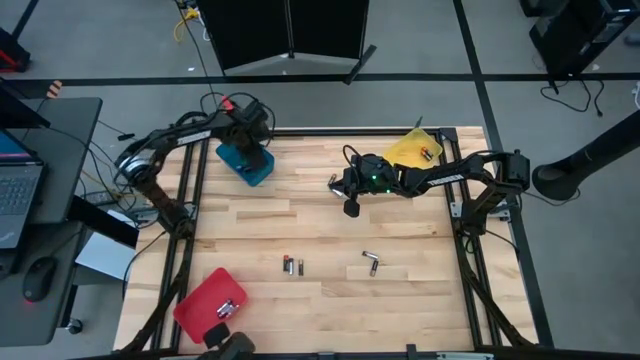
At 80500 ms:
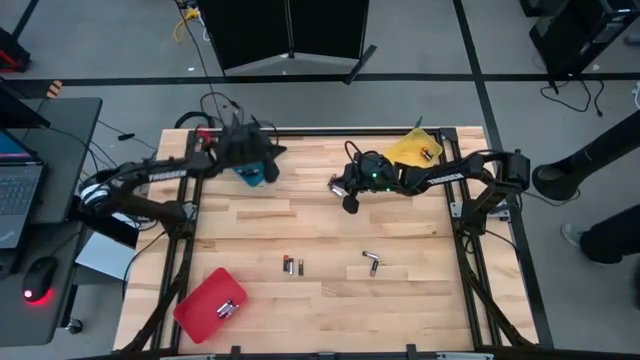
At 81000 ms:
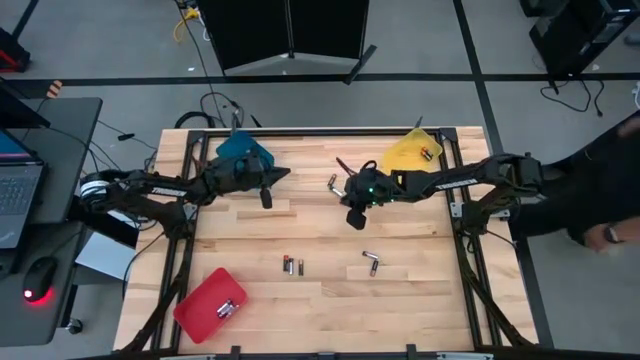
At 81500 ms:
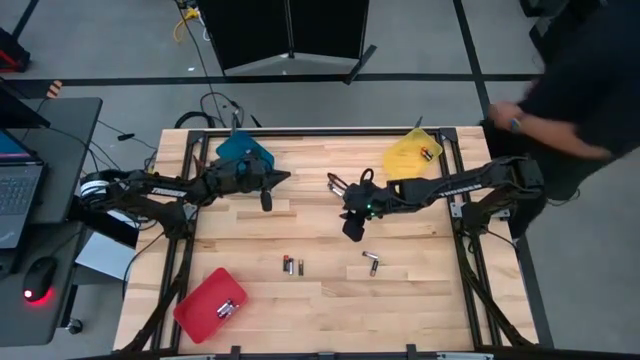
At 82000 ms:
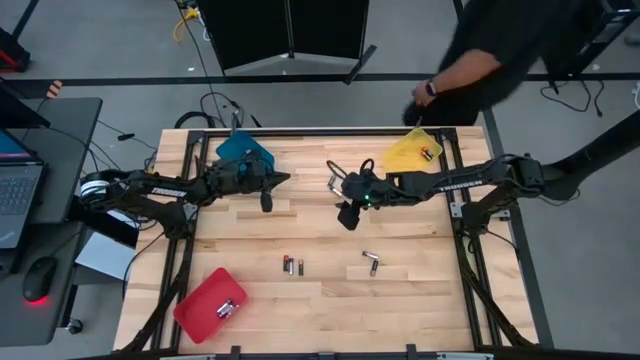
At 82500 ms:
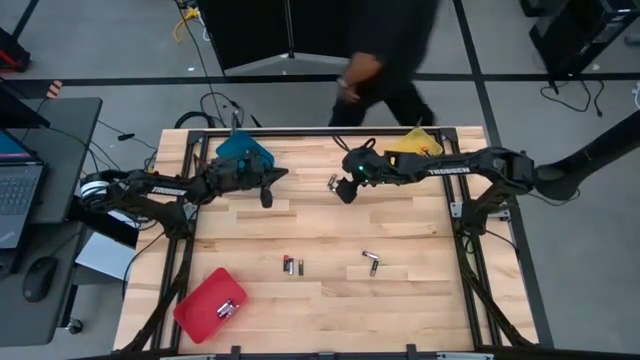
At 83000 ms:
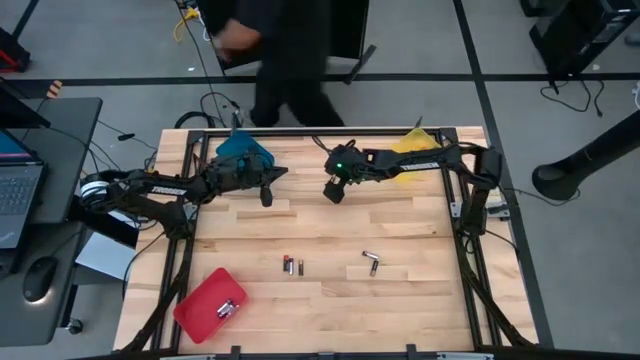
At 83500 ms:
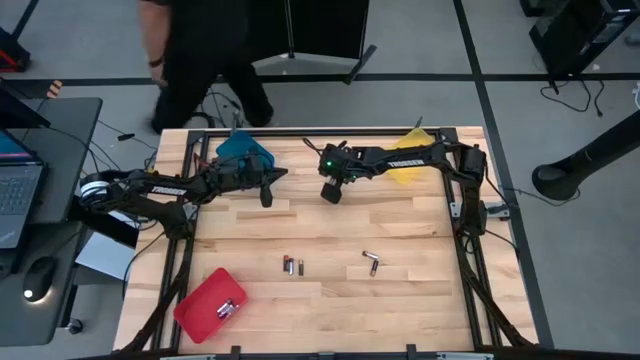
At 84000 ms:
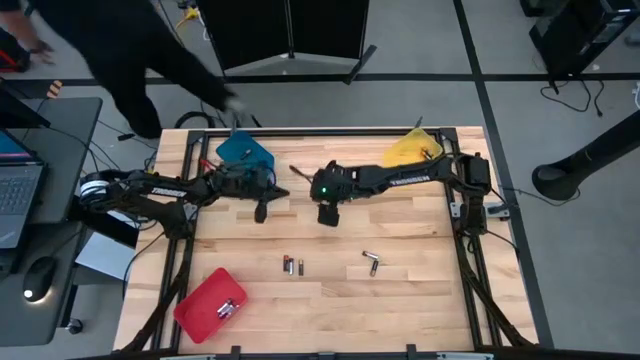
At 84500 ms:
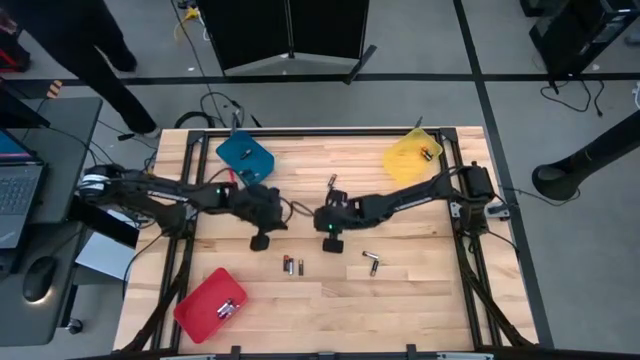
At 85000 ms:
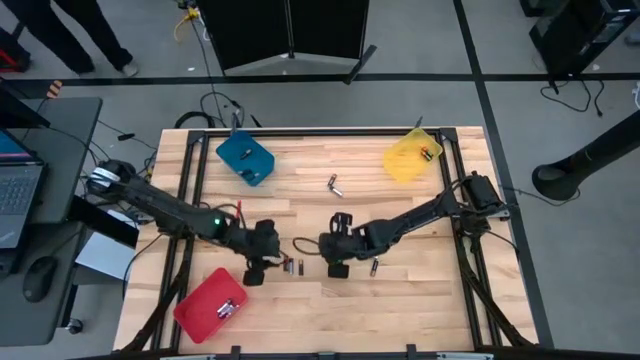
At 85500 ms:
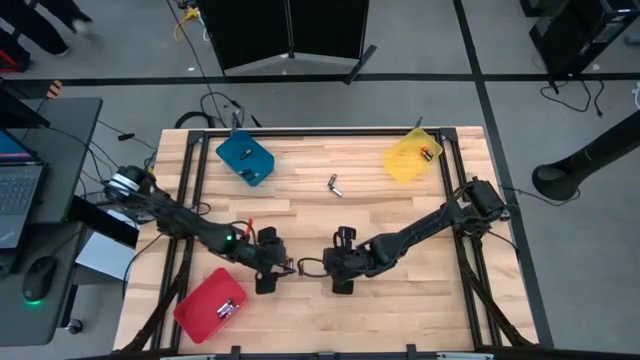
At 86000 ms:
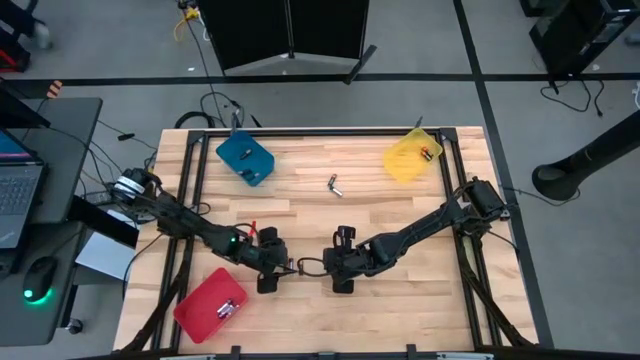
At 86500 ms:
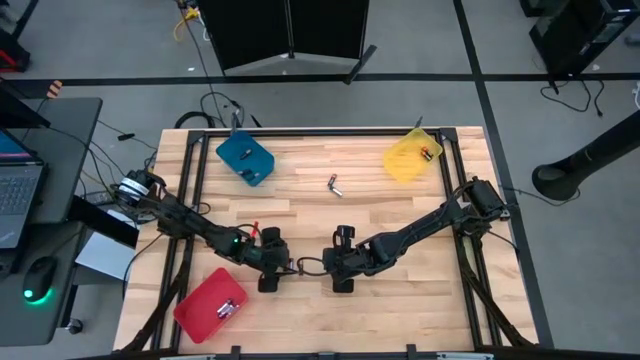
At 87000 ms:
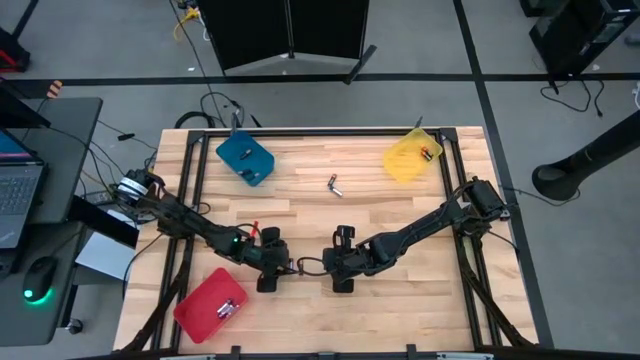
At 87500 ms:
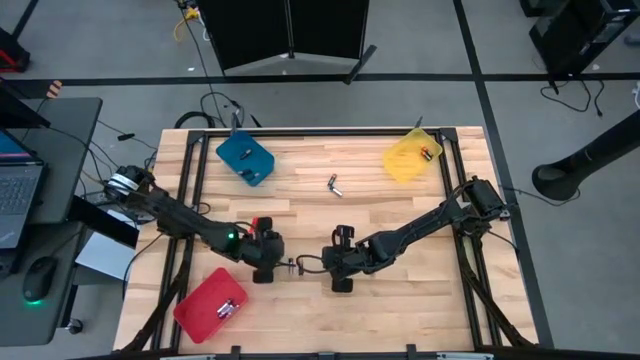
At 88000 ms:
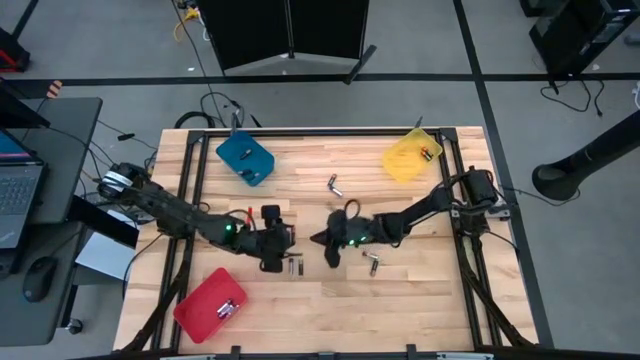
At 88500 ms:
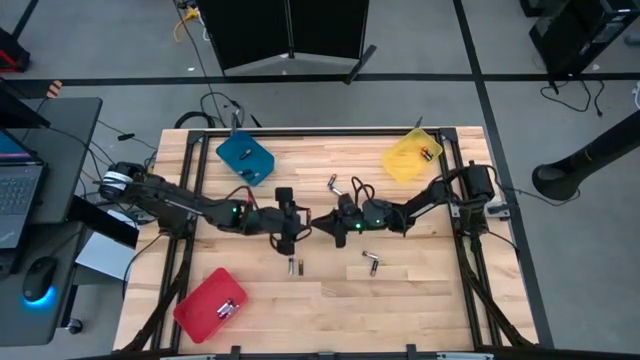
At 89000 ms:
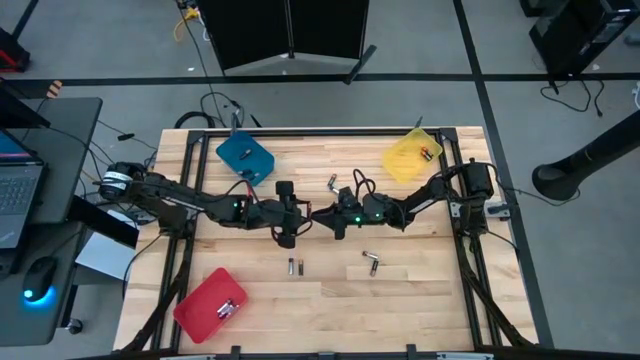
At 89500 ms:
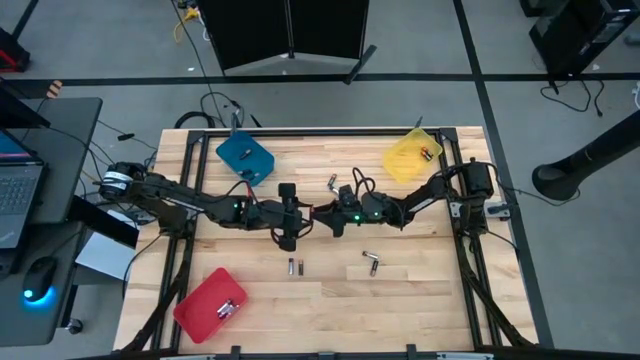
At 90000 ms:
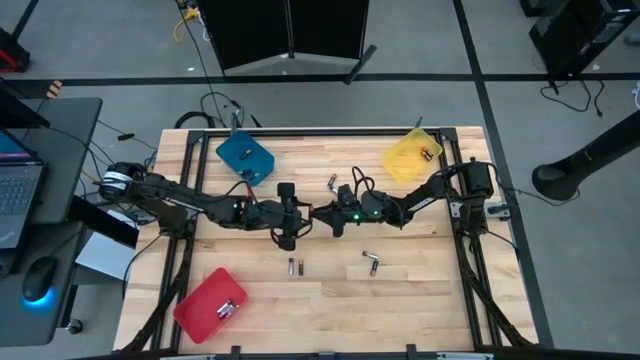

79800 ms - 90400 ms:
Task: Sort batteries
Put the bottom black orange battery into the yellow bin

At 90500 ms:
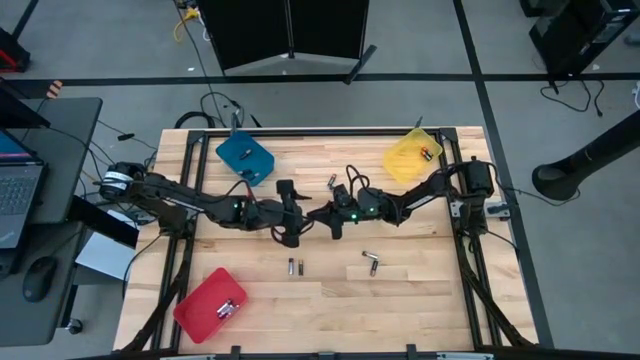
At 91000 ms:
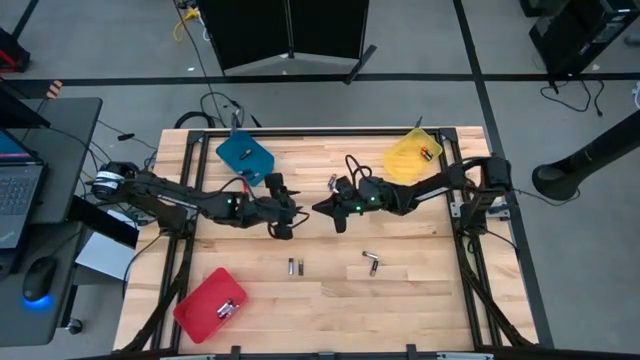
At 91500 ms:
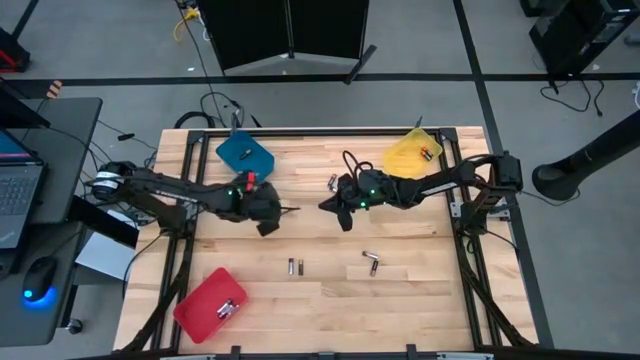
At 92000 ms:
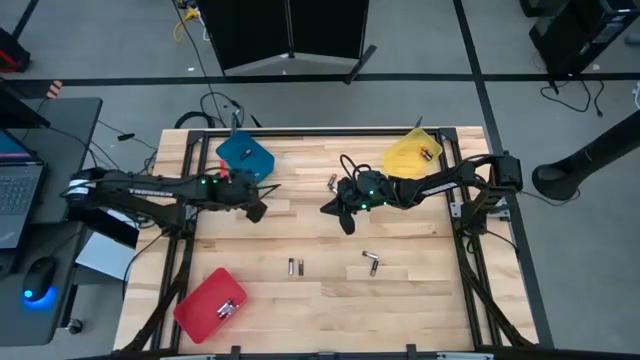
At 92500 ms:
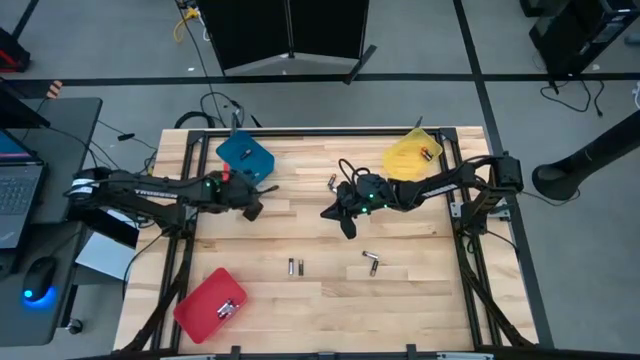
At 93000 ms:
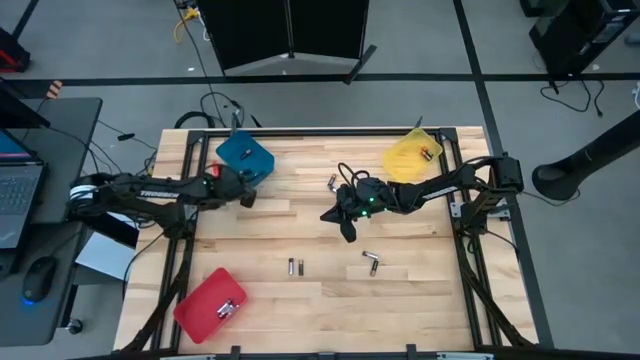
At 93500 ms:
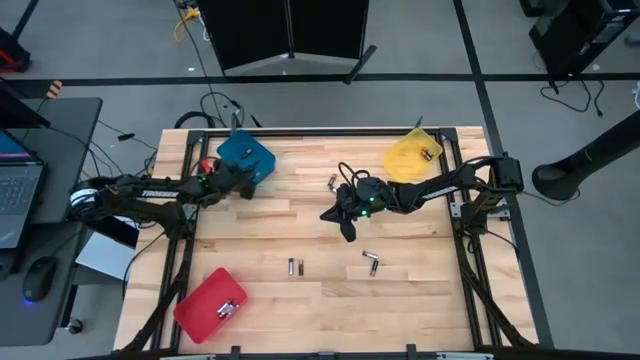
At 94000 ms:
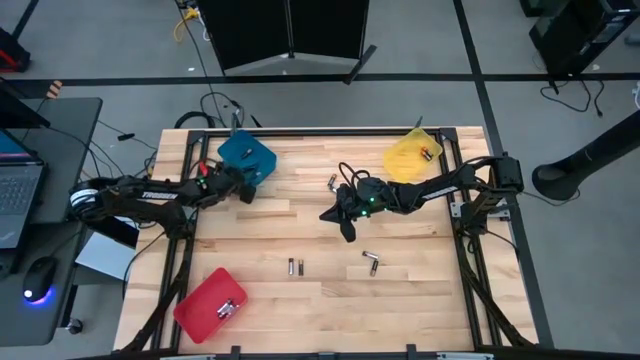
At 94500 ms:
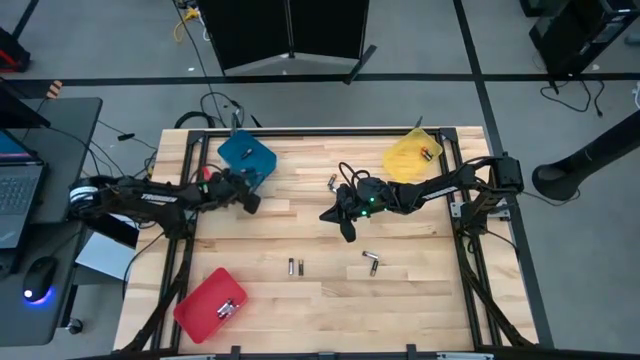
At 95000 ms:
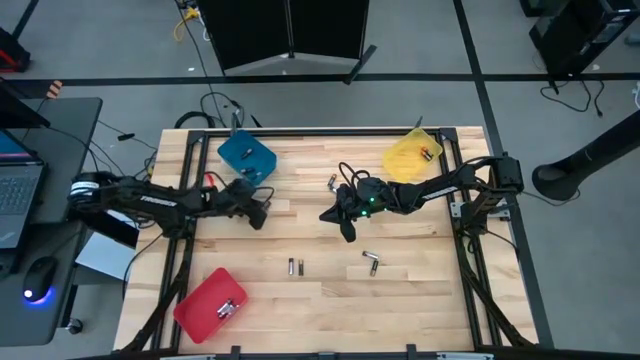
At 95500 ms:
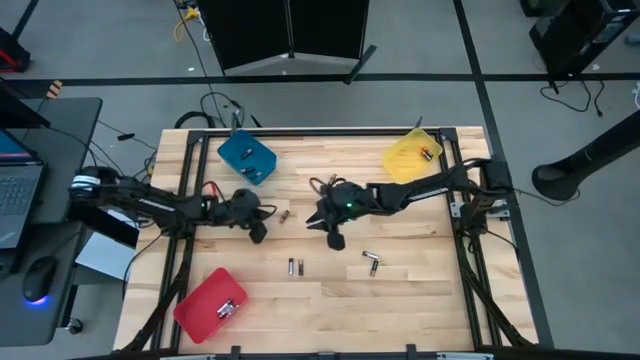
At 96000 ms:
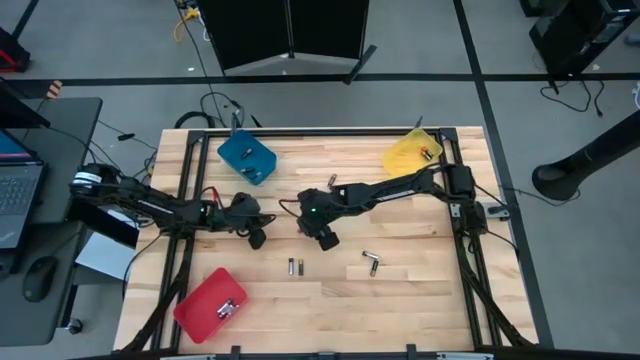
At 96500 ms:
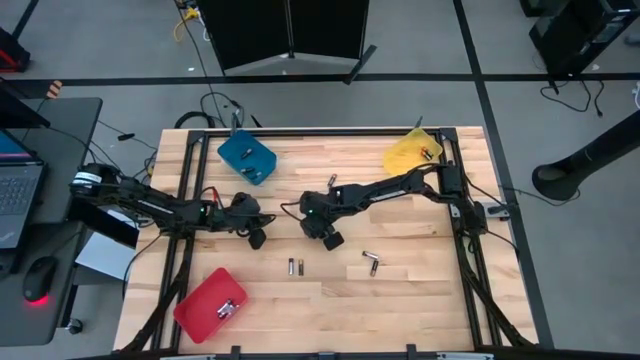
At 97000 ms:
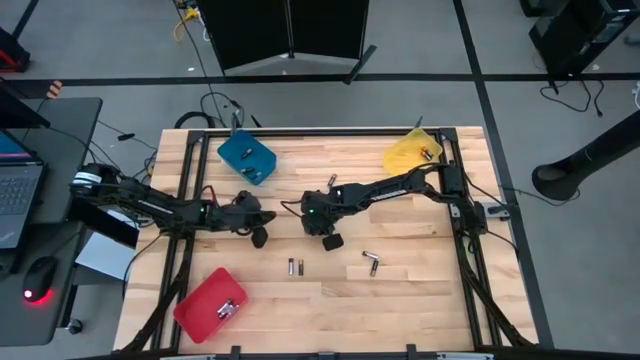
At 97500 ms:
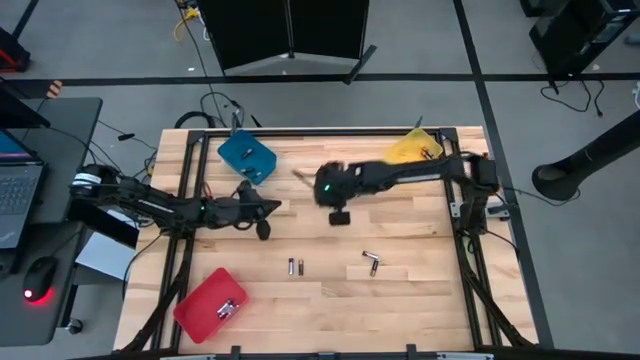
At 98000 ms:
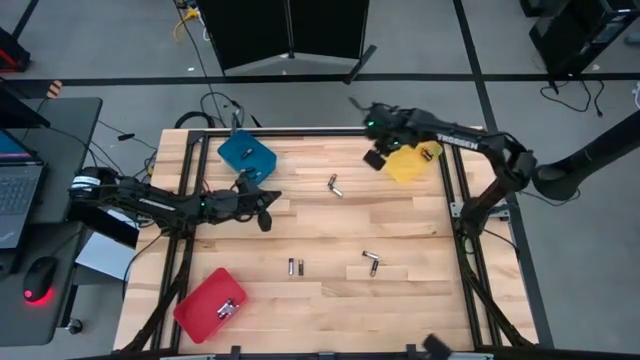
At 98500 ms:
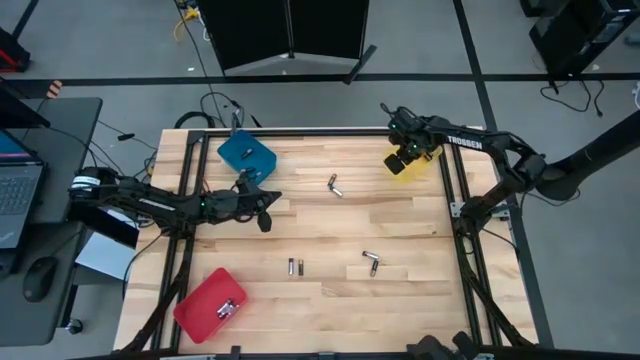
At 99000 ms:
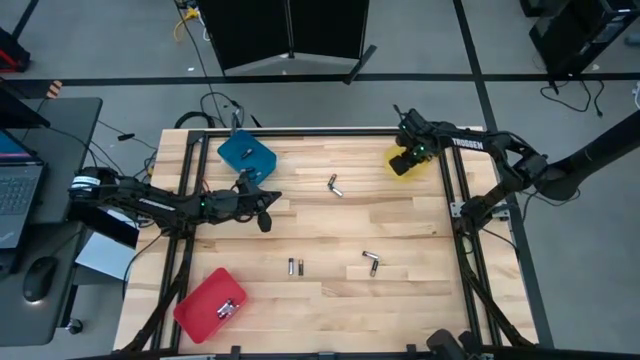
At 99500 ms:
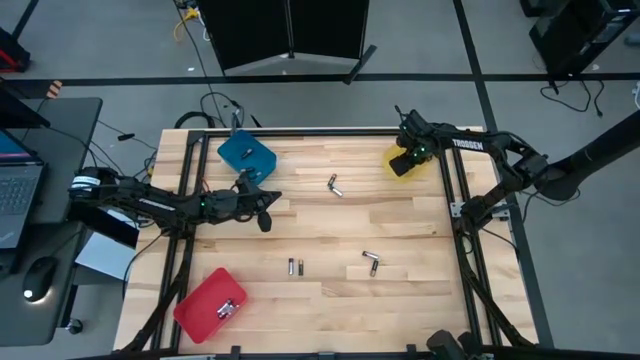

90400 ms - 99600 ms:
Put the bottom black orange battery into the yellow bin

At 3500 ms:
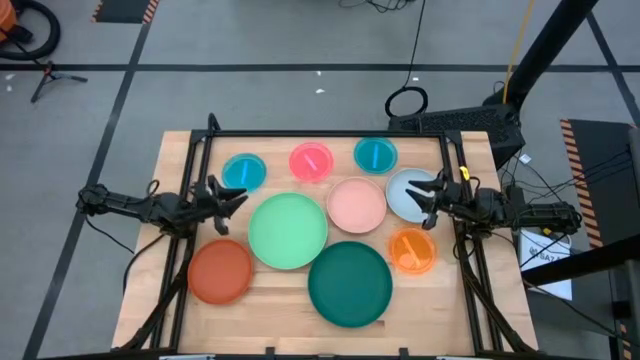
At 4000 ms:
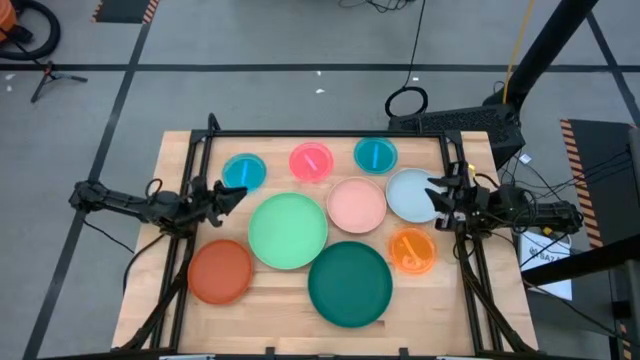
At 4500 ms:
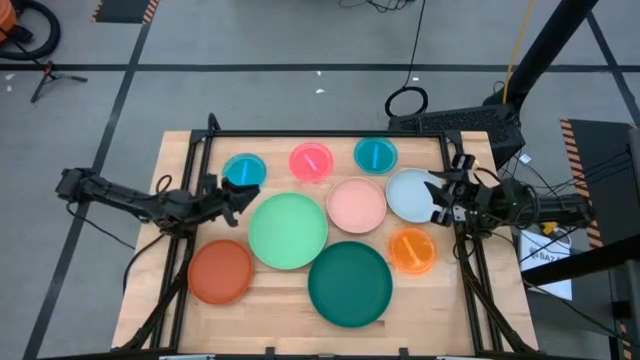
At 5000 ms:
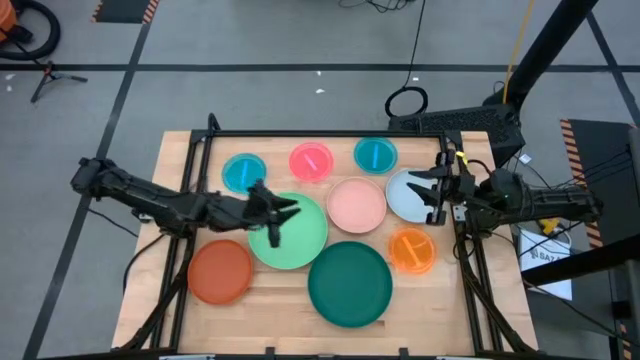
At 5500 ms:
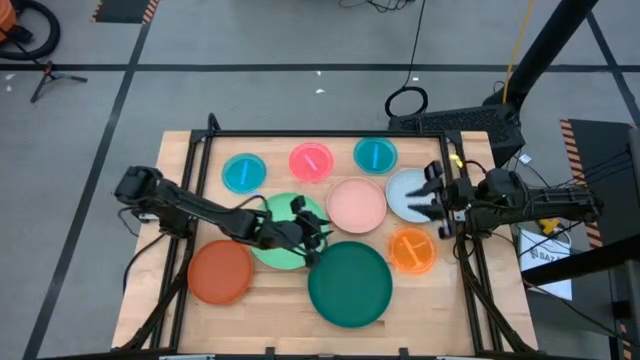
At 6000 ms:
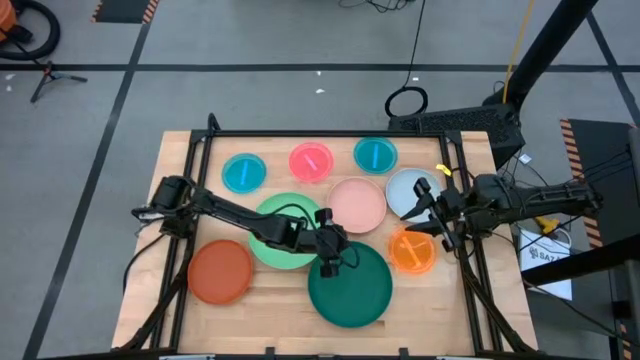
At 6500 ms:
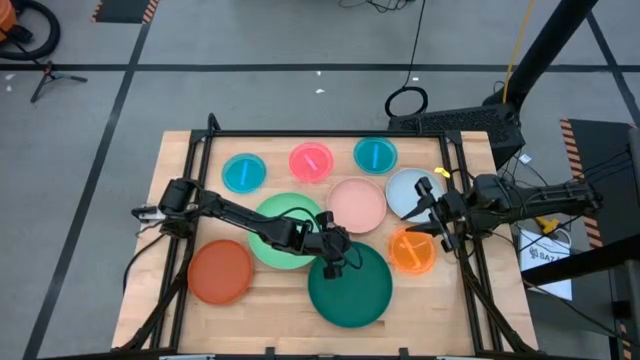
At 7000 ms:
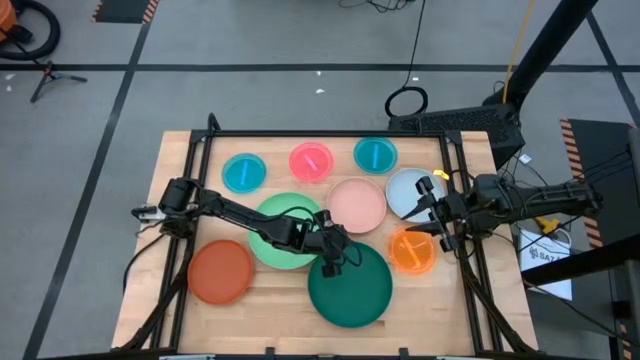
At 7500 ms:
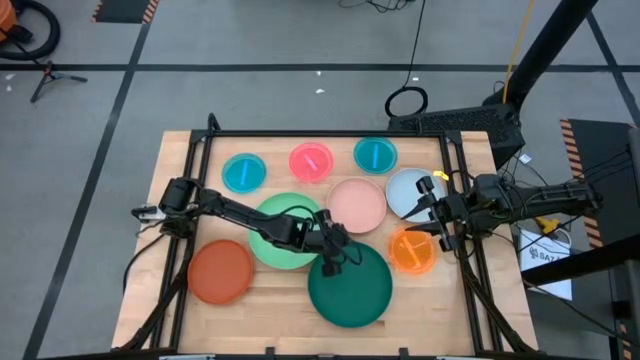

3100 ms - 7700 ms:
Task: Stack plastic plates
Stack the green plate on top of the light green plate
